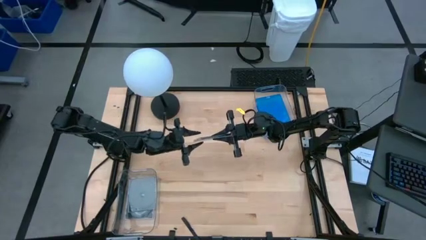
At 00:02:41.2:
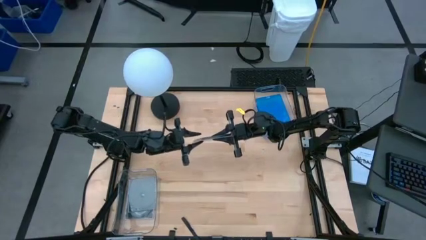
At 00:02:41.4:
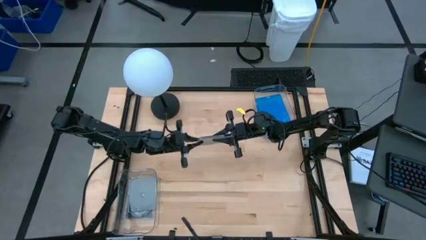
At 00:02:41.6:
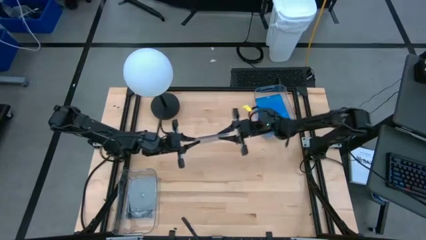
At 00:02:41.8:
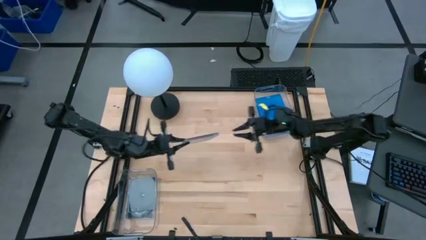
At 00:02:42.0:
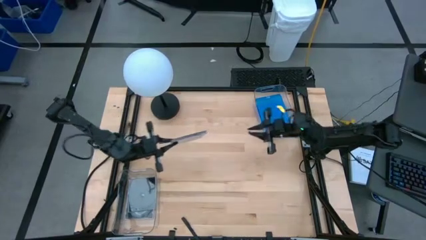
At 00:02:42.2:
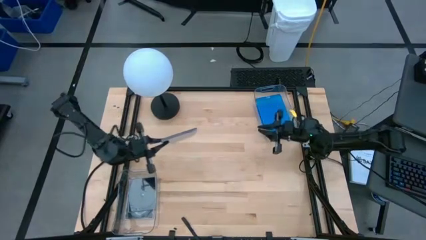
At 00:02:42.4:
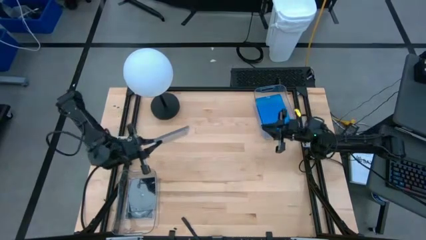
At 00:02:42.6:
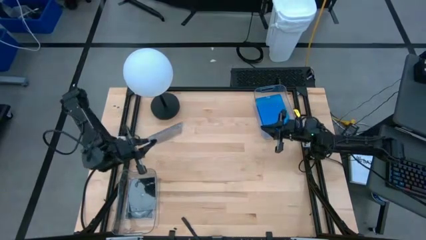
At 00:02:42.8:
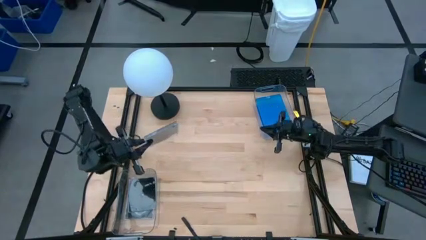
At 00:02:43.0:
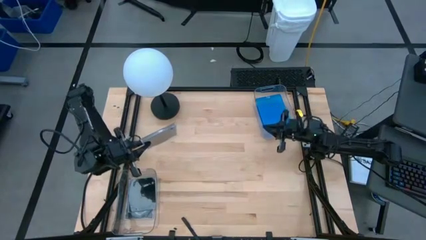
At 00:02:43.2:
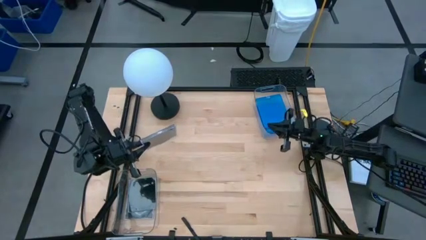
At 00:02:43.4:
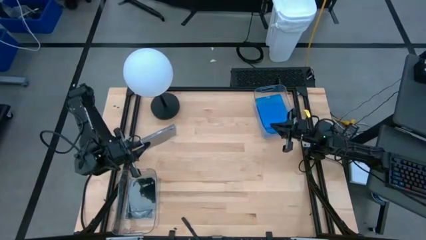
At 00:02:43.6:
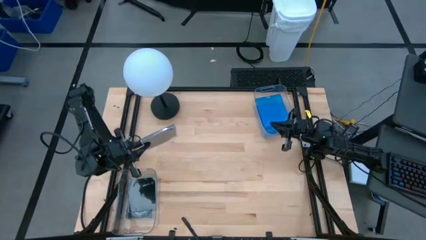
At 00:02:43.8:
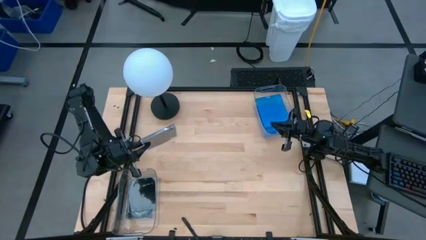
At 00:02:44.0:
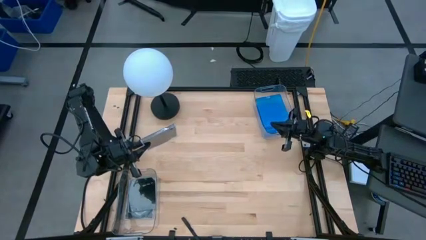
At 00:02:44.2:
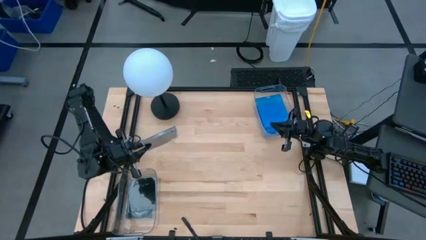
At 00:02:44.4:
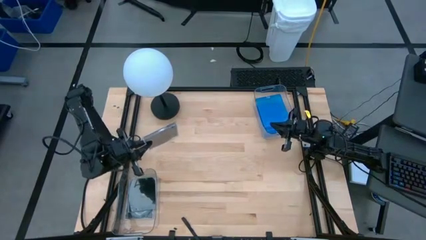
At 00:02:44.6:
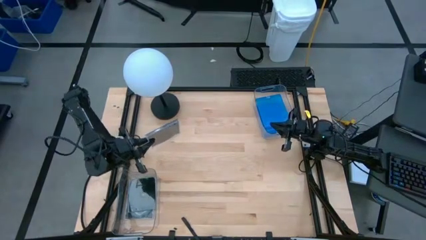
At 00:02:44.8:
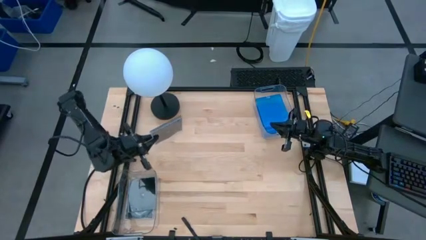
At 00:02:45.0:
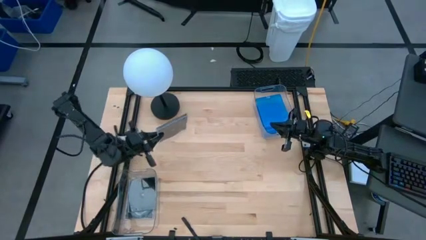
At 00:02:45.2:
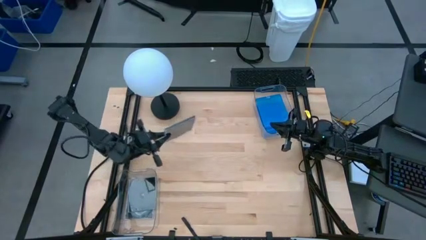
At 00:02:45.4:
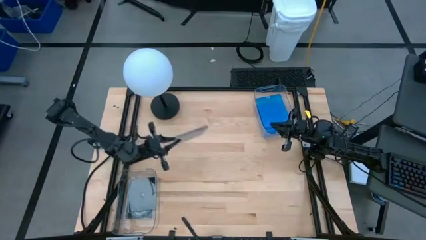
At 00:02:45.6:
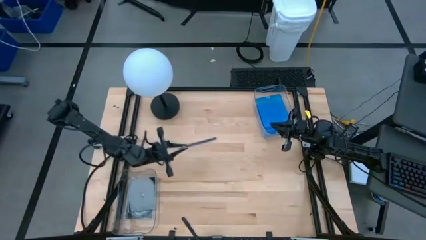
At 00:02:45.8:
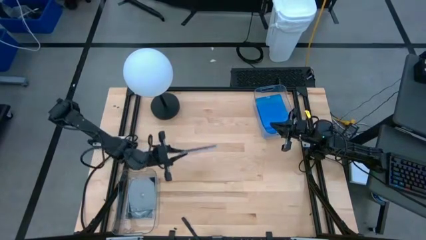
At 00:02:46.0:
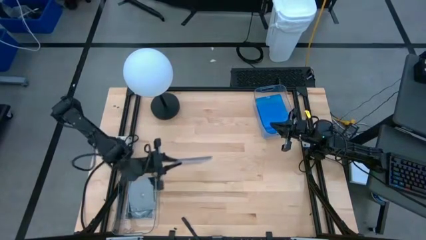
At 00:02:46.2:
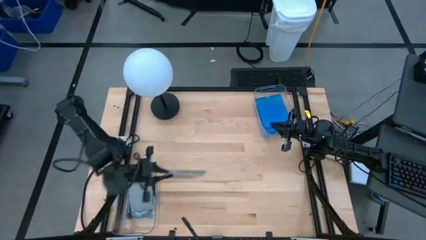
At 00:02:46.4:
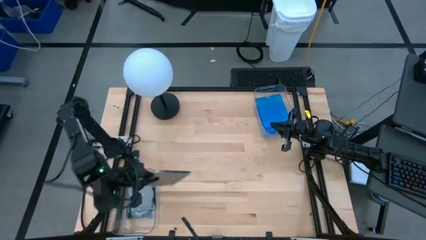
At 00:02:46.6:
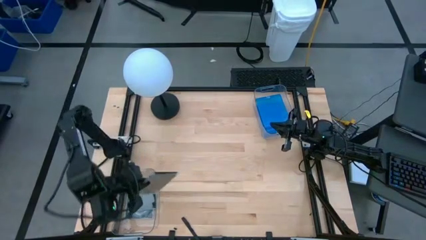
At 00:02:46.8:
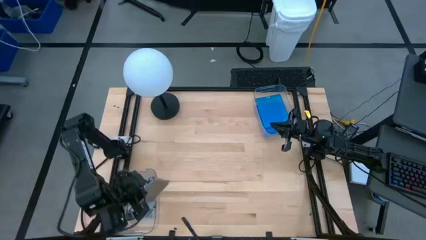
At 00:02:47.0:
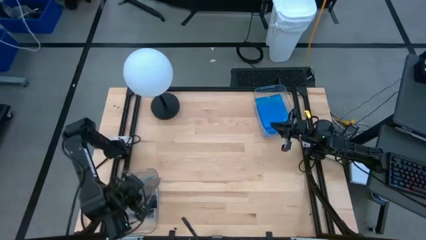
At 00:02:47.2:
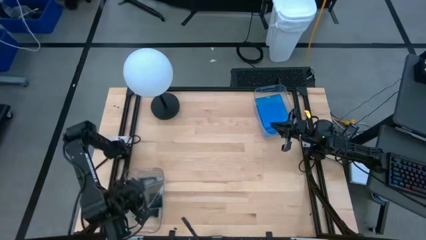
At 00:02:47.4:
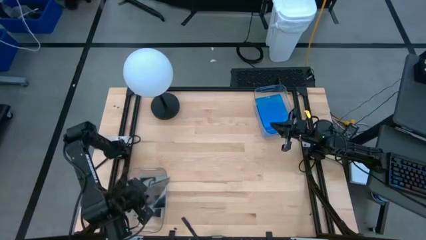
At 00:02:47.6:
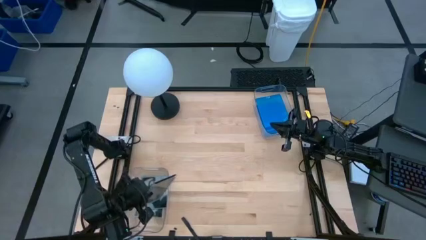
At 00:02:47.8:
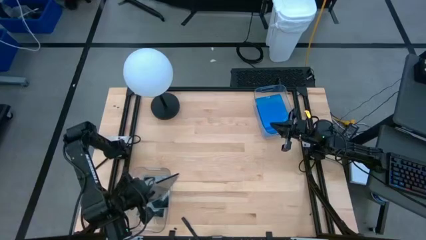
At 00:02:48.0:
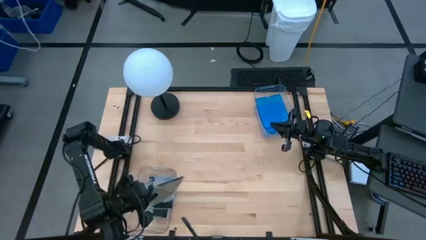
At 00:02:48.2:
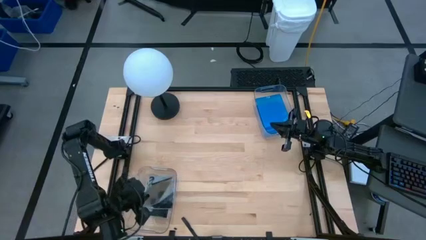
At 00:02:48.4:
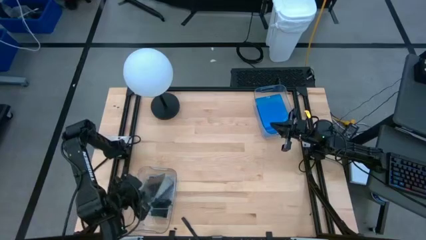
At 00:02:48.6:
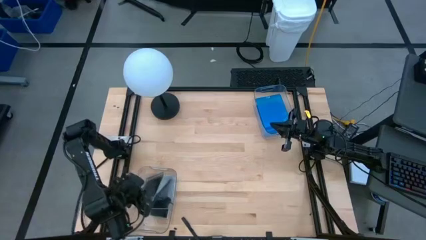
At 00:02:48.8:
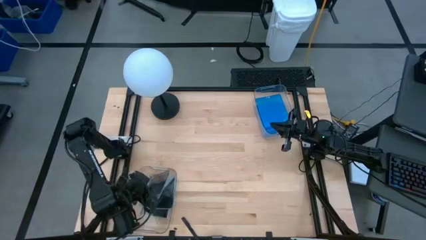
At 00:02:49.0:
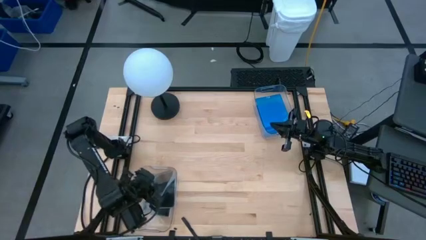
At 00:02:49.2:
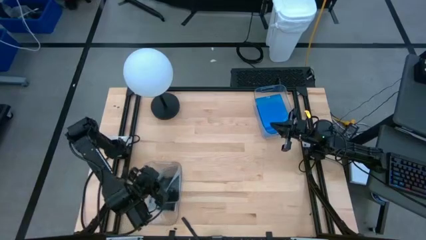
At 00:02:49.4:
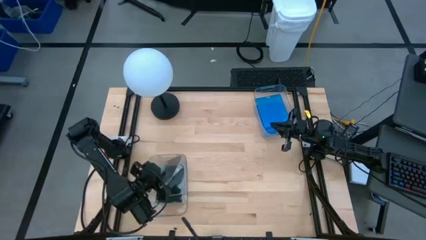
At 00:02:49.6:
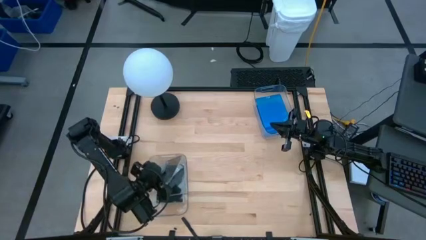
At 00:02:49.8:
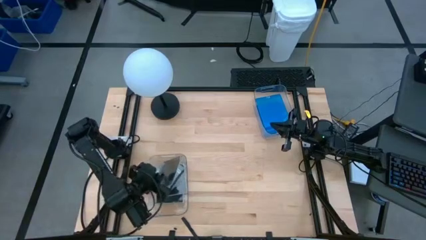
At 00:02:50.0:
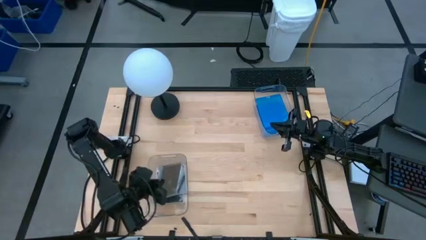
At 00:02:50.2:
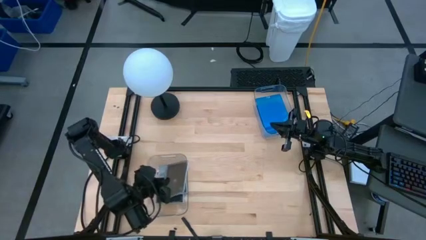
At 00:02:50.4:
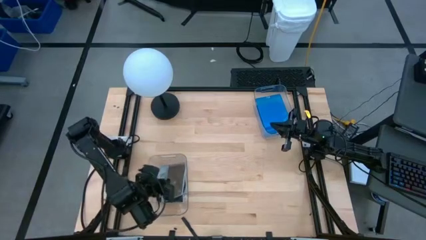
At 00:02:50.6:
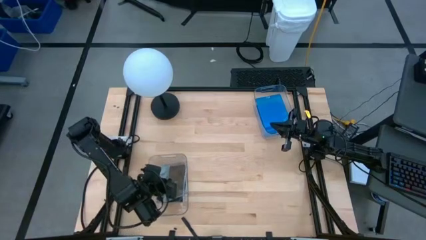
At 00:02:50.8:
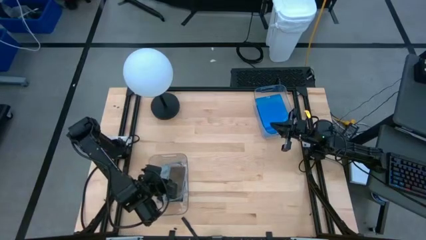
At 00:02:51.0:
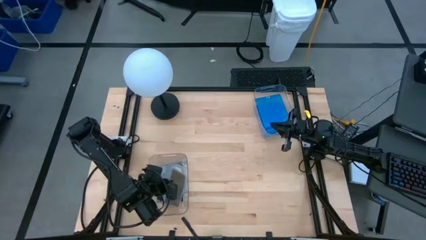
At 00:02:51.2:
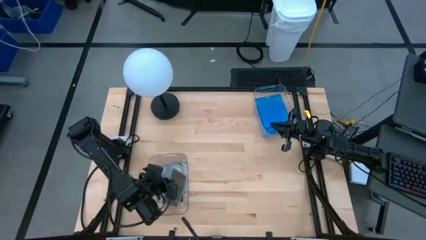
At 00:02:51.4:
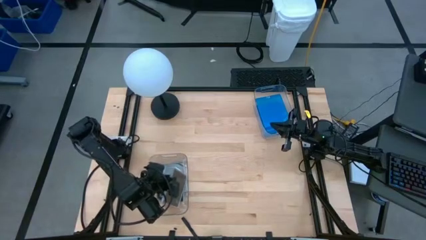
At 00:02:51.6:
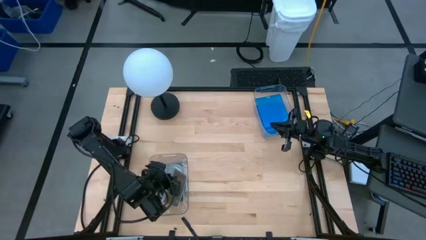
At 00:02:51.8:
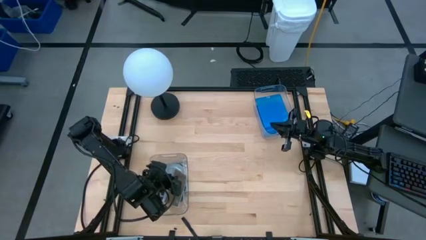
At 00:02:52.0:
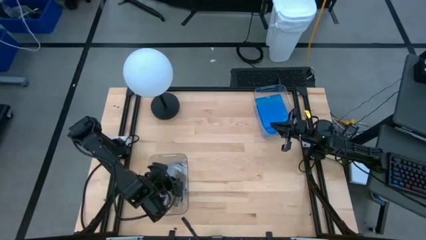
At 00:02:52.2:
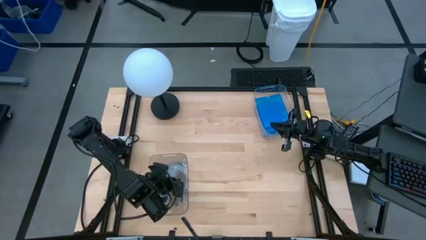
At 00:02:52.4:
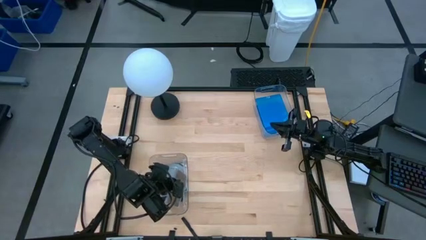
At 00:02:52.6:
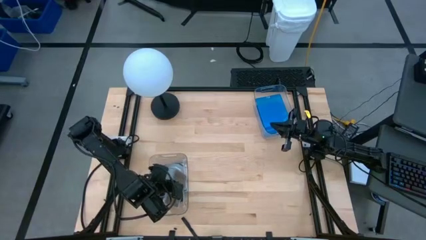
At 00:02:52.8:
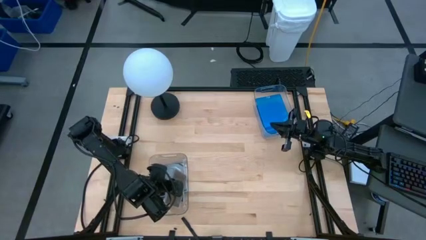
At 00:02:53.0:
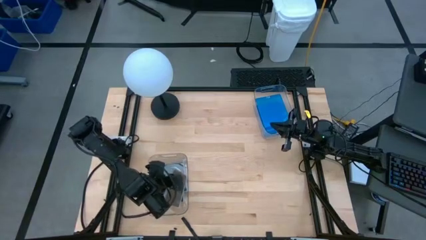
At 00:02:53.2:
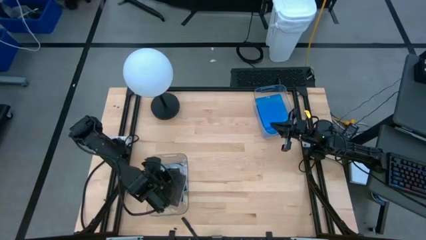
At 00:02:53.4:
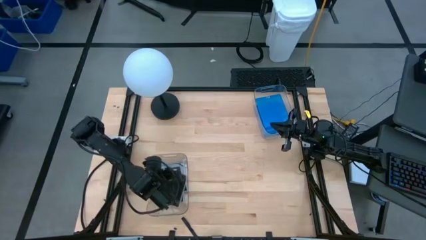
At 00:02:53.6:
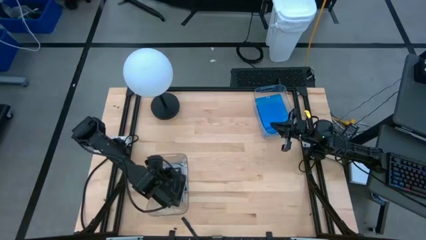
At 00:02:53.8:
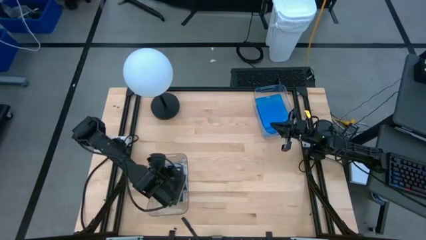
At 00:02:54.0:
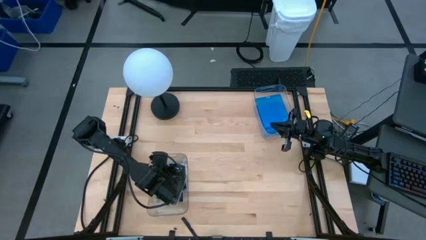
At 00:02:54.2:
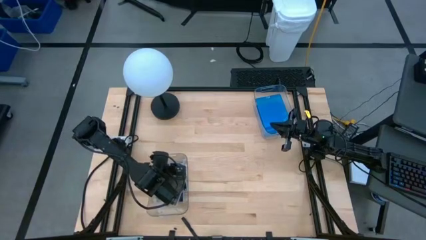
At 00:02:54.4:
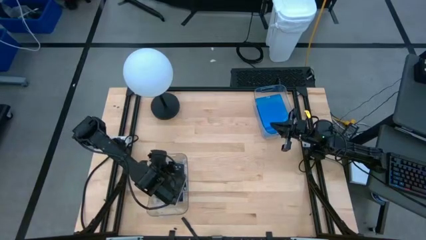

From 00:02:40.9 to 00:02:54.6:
Task: Pick & place jewel cases by type
Put the bottom black CD case into the bottom transparent bin

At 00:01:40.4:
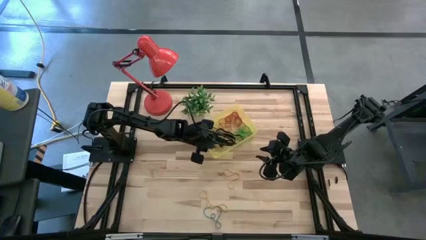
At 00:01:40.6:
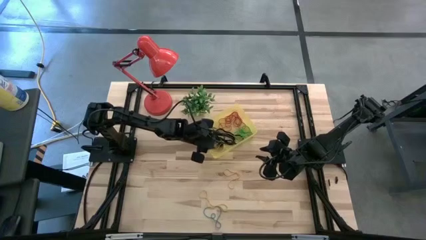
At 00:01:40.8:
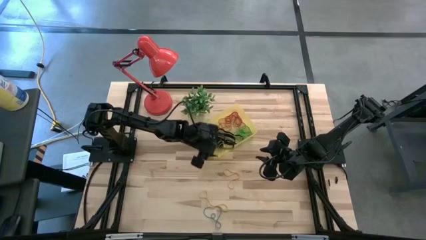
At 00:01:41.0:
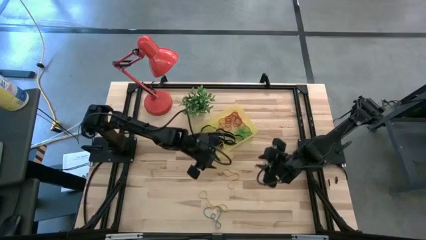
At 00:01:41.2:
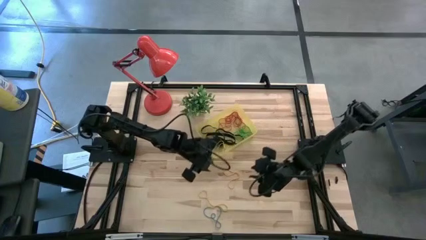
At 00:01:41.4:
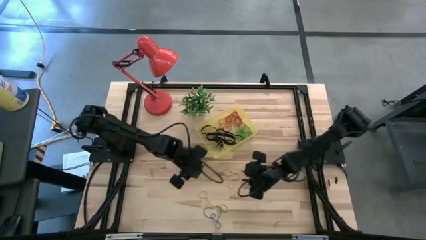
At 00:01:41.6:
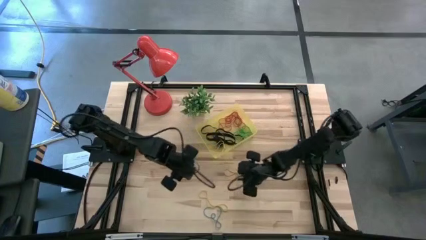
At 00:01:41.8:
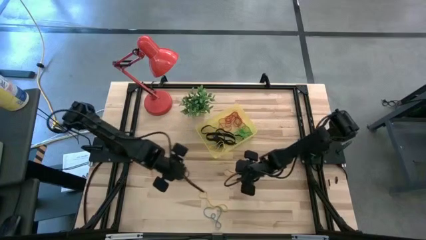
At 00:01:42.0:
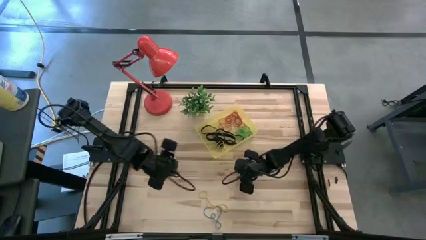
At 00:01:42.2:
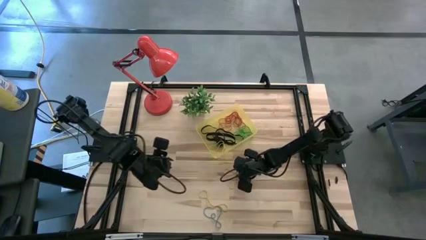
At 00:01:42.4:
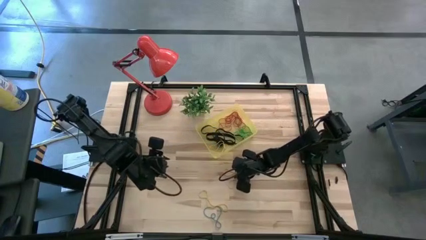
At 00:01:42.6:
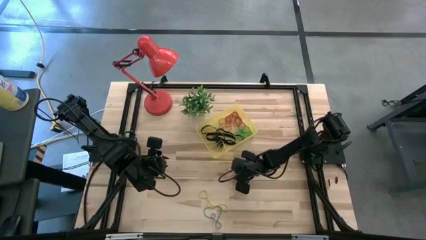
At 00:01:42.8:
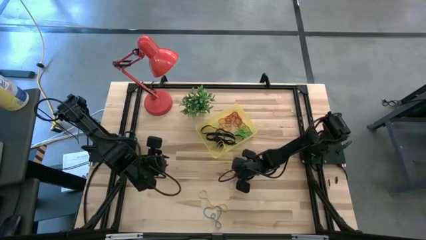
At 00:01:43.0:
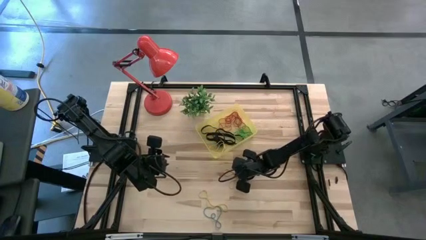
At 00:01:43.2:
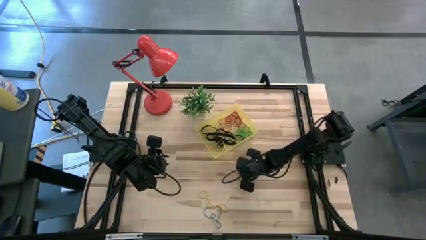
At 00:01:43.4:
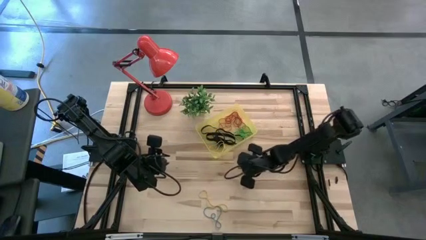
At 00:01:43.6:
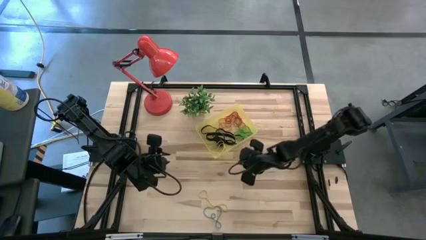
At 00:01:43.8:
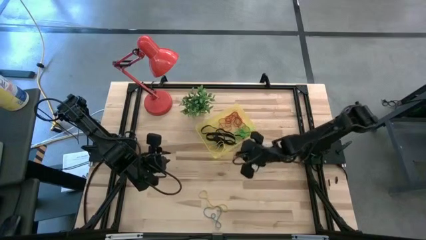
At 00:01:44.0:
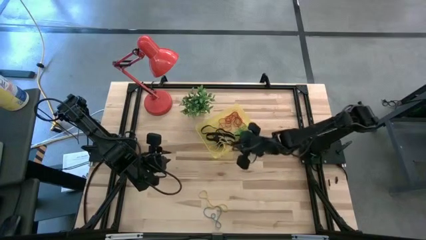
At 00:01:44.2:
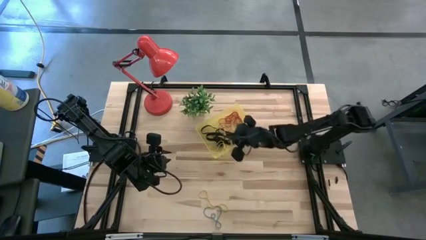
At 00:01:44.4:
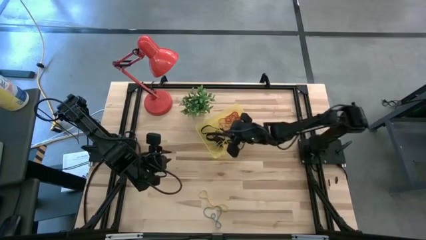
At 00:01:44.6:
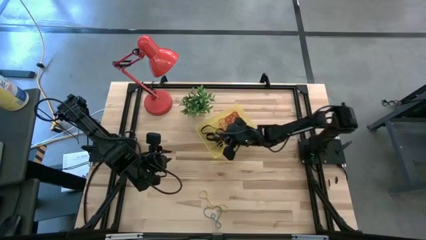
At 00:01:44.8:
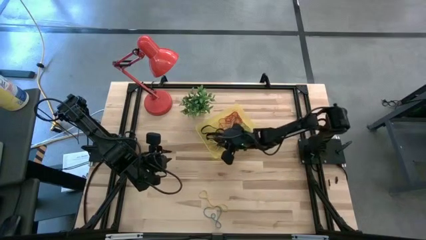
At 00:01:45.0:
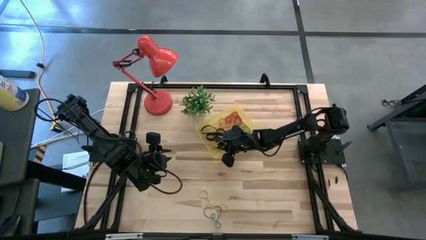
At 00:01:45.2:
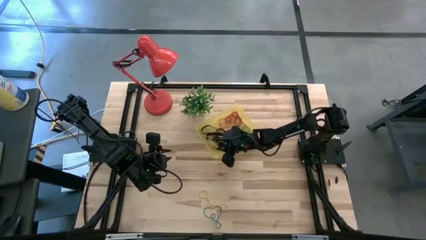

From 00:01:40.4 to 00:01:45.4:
Task: Pick and place rubber bands into bin
Put the yellow rubber band into the transparent yellow bin
